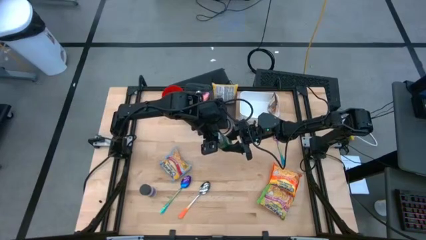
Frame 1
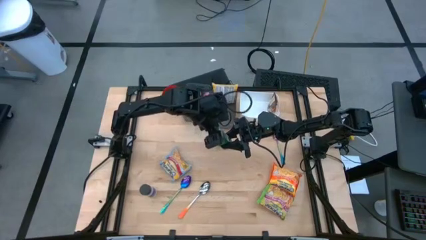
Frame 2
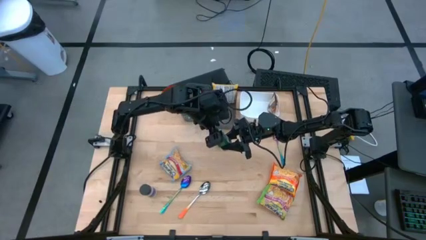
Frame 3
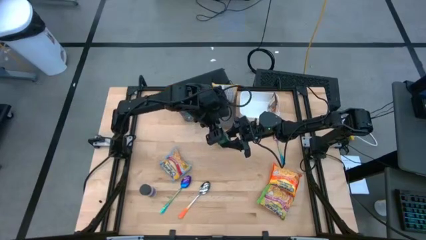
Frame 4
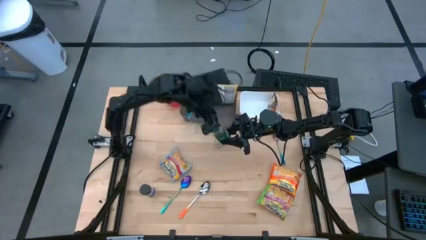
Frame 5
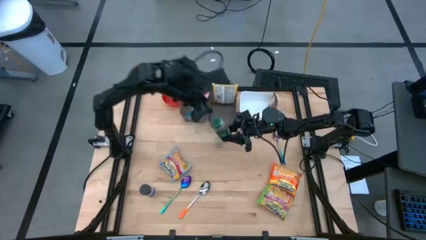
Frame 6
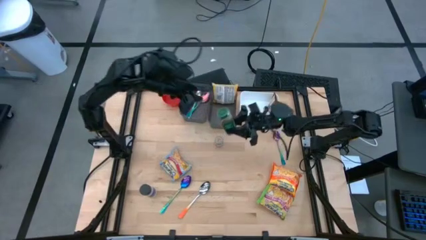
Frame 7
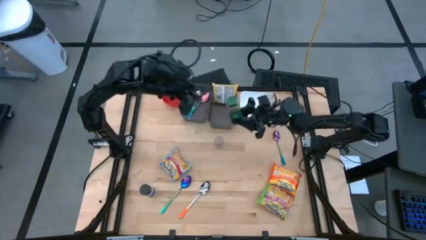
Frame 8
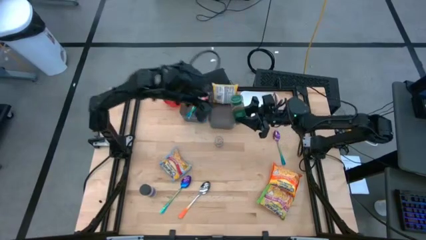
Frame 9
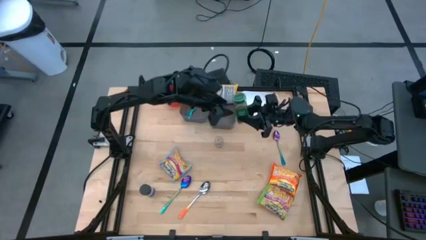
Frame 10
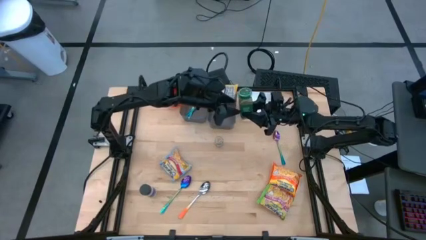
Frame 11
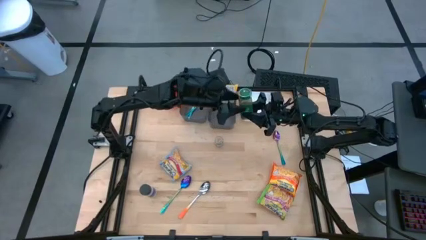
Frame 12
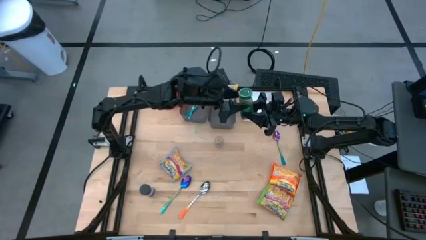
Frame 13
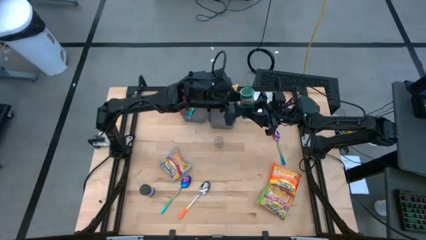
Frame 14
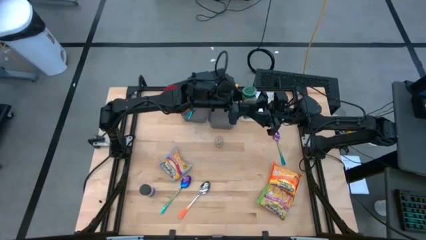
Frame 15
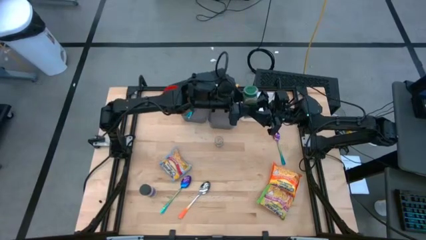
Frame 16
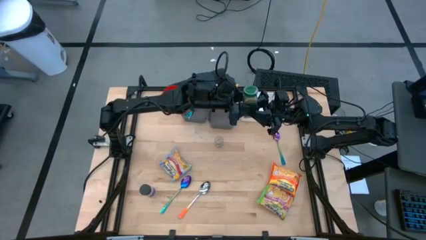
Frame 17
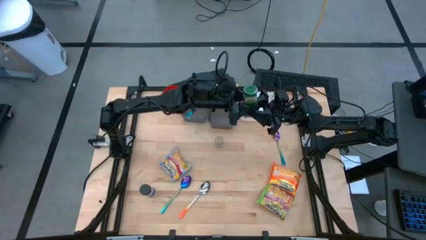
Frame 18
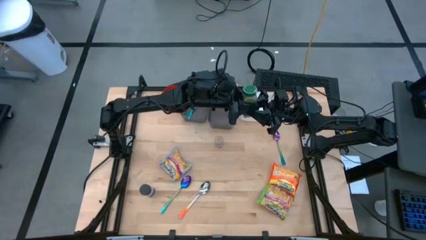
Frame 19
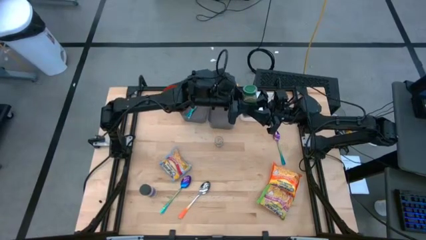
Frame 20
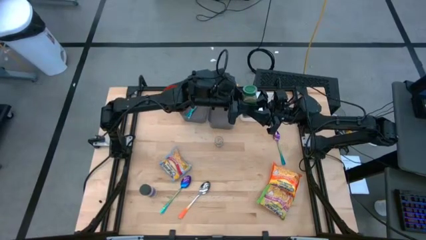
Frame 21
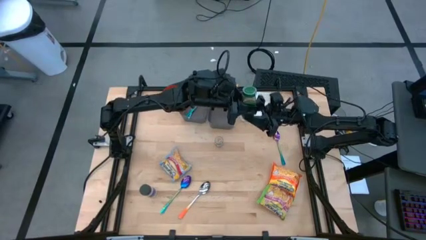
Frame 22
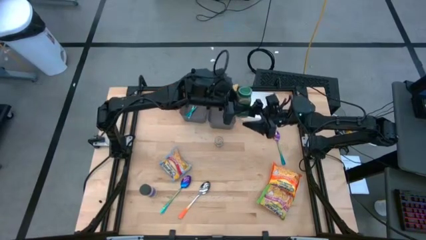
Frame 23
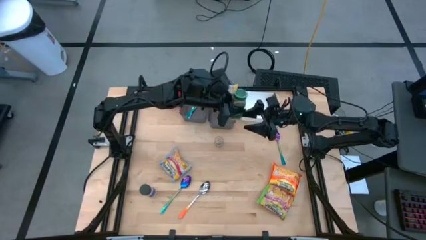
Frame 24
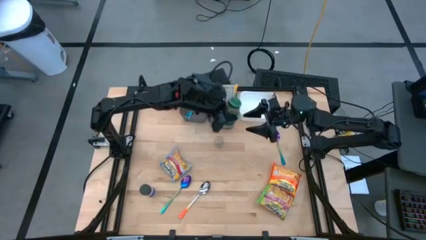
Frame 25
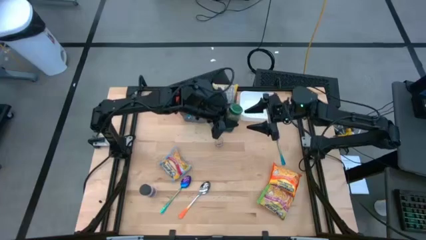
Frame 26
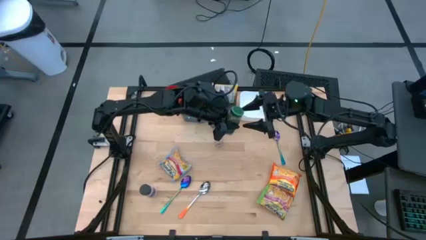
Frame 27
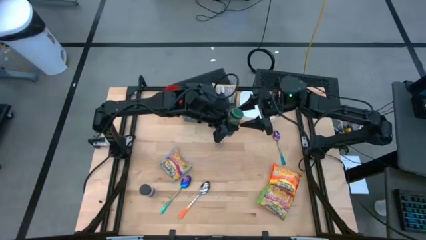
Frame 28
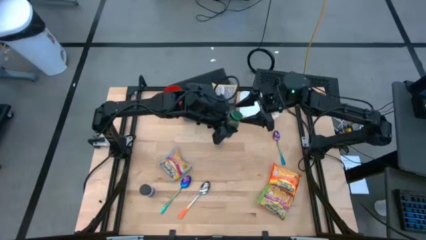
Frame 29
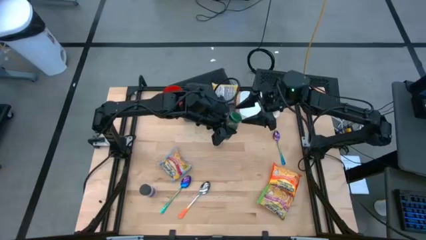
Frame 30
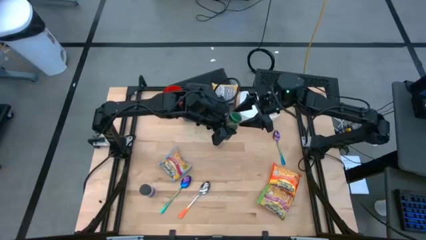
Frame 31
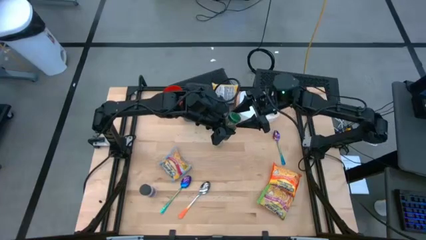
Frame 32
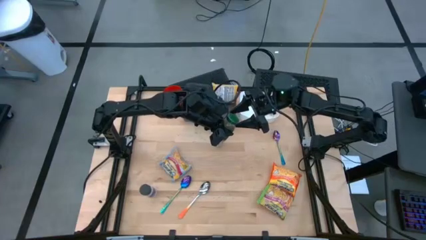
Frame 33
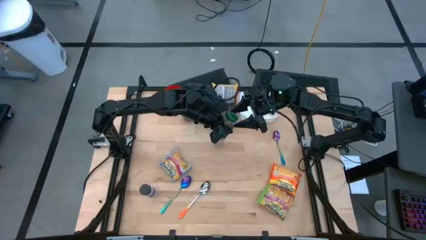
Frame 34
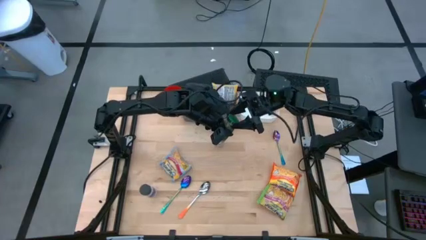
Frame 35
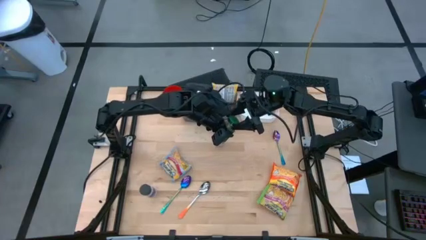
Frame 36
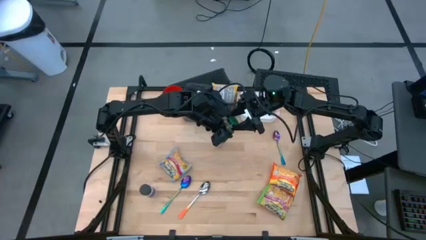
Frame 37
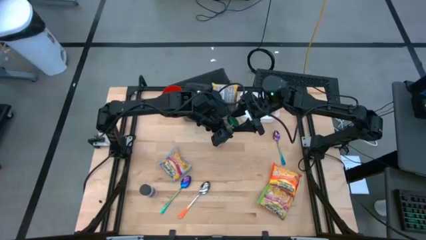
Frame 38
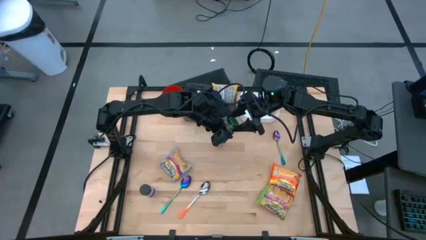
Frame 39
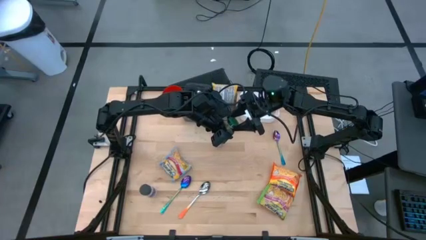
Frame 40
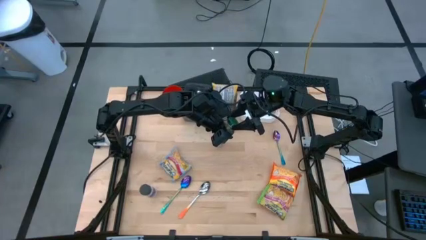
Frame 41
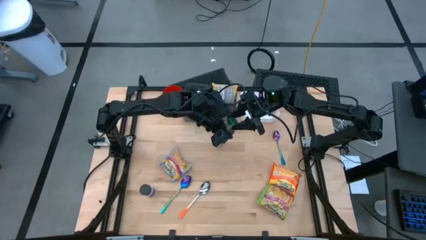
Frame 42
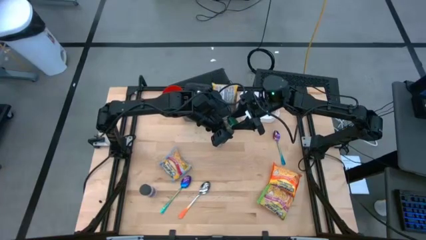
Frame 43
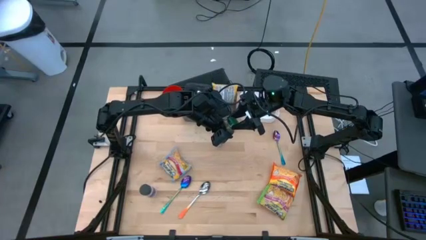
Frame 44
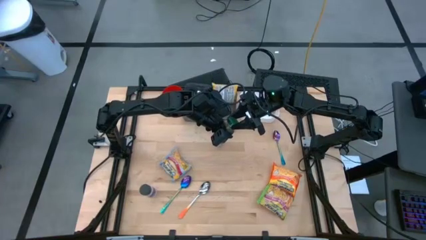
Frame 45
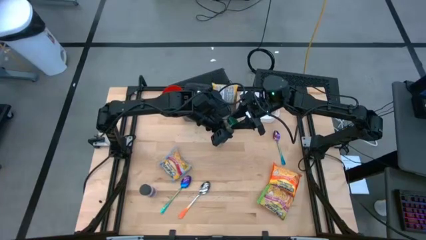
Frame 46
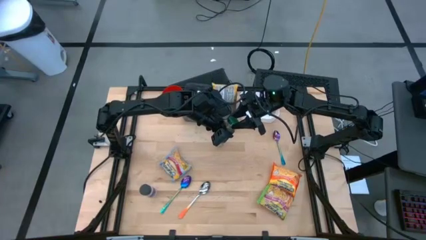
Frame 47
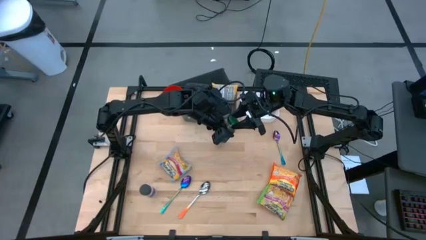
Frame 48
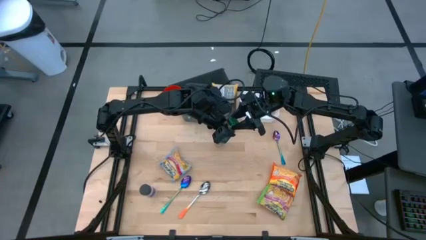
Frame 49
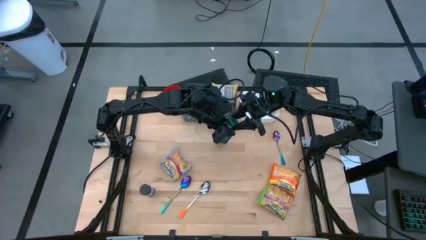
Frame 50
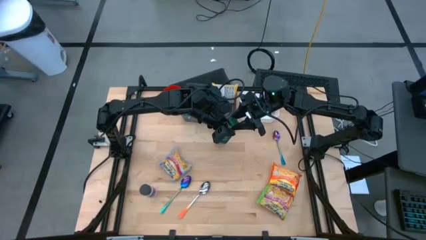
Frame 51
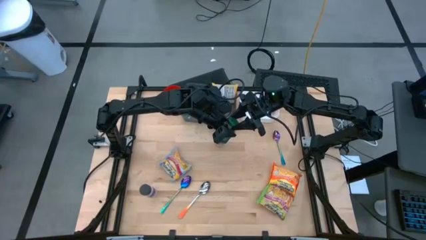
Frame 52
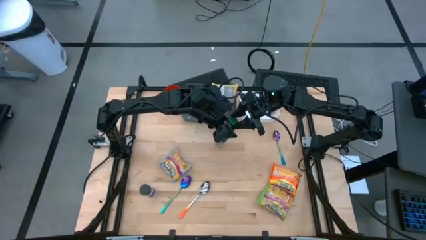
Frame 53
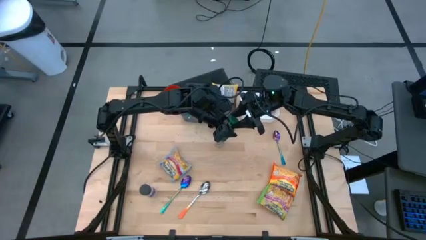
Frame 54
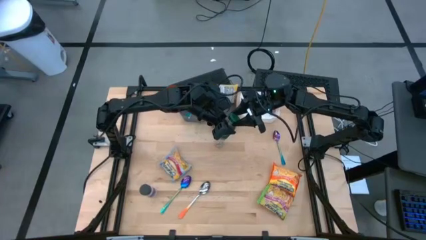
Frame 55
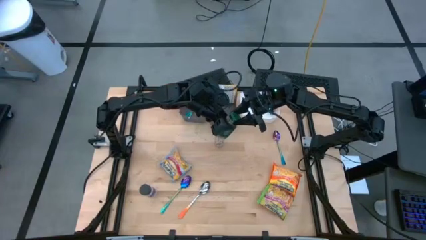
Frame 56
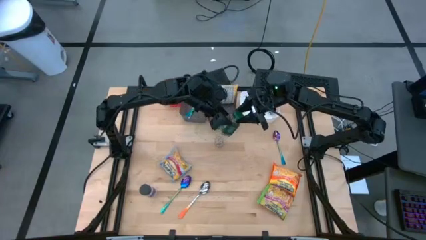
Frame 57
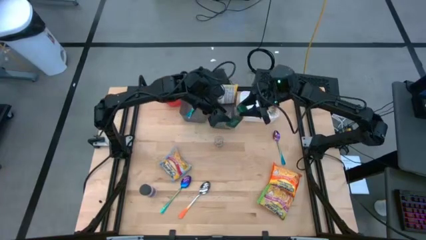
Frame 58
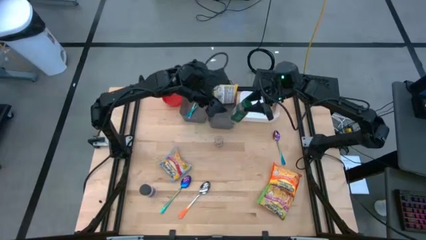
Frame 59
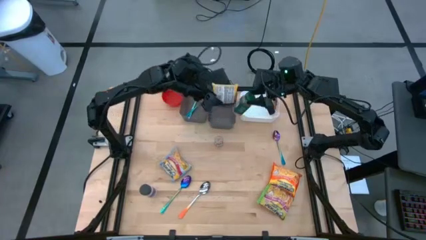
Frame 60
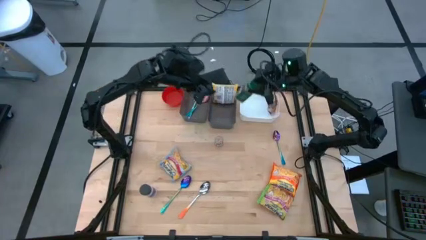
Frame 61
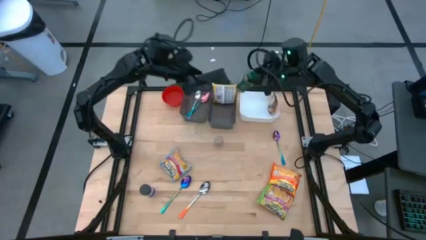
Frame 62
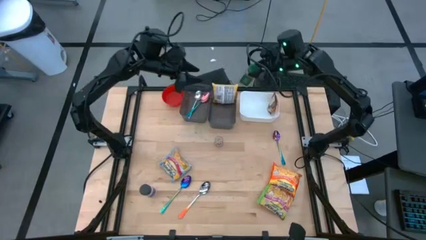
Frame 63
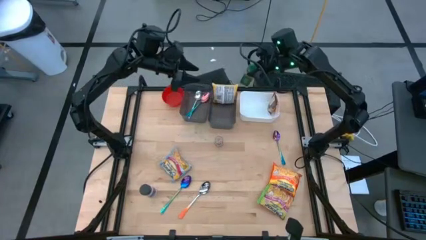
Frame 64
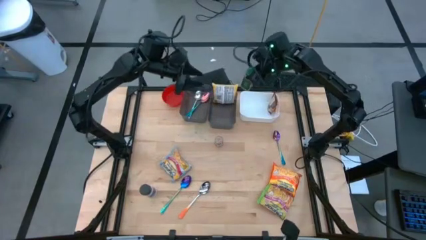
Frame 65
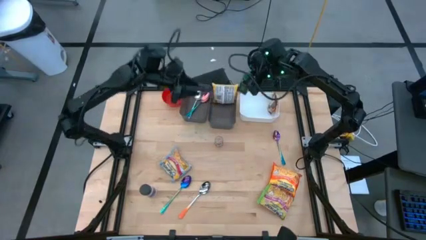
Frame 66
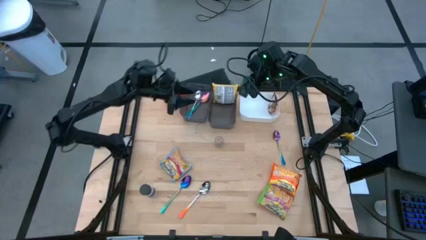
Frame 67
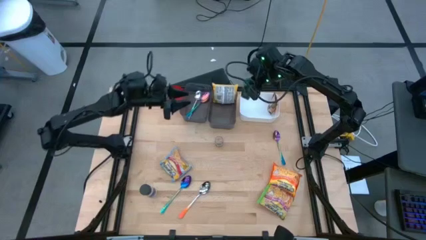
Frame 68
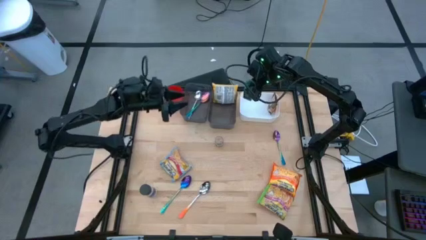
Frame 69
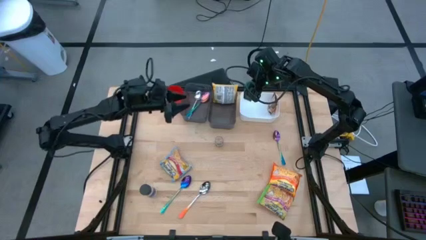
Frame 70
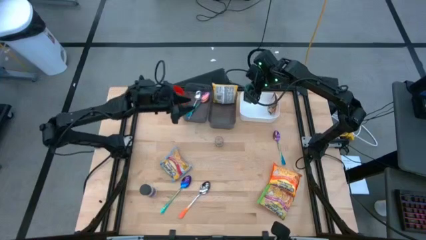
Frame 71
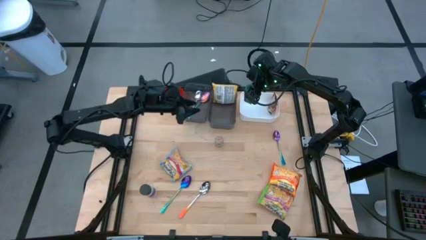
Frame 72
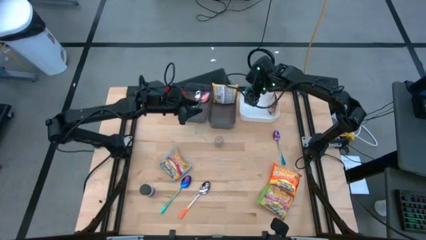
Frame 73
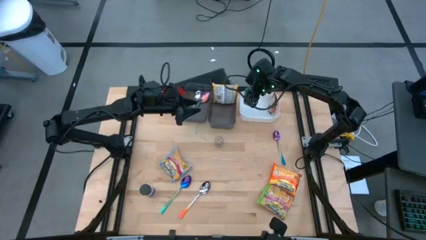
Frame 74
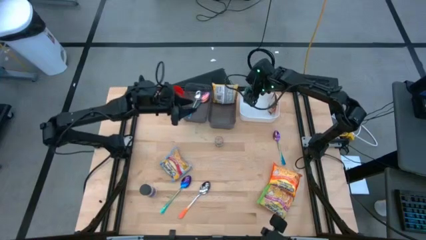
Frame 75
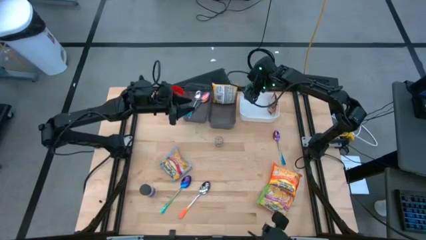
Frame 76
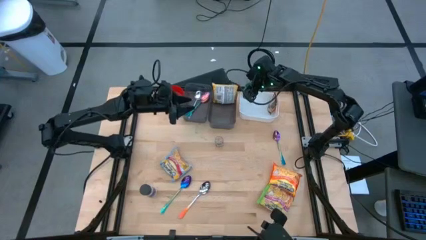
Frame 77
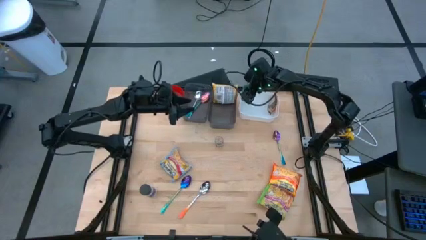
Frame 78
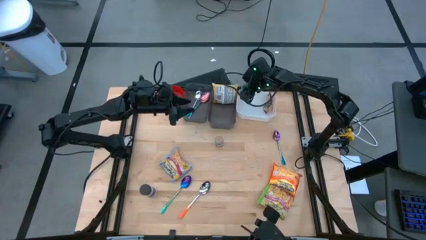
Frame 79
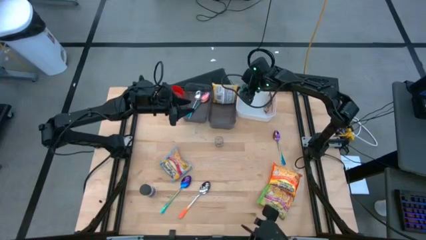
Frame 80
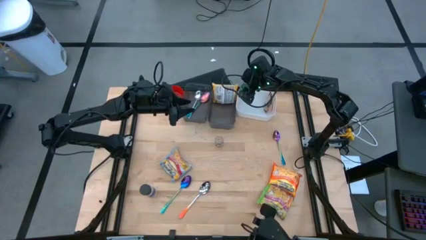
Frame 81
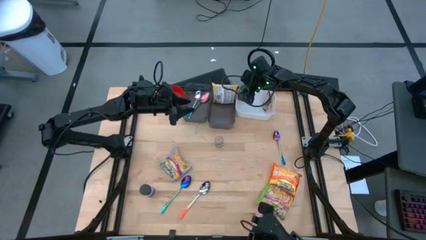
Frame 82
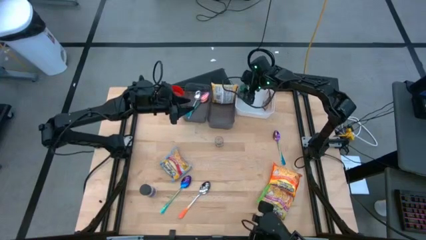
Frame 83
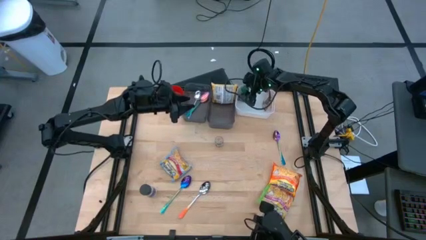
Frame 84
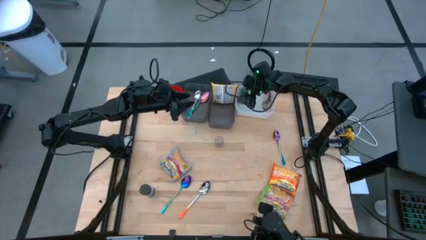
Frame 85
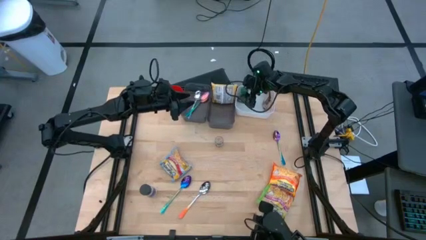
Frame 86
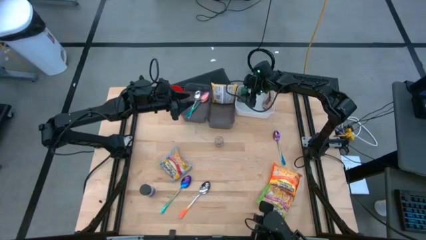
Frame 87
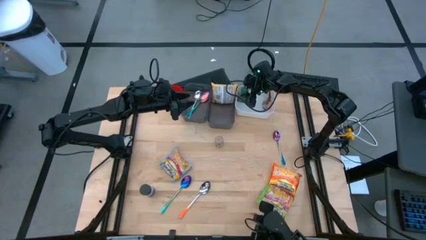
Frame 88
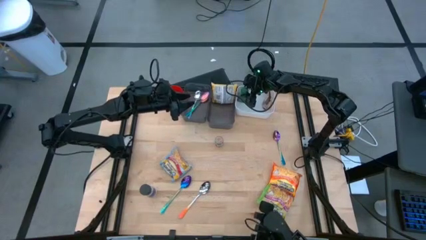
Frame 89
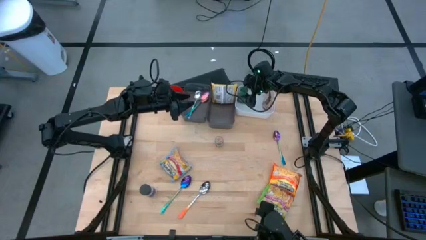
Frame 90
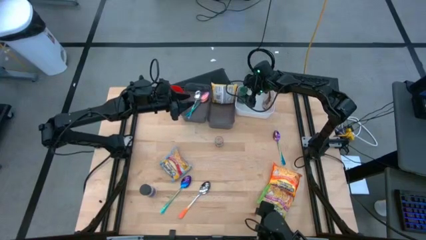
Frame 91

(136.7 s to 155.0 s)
Task: Pick & Place Food Item
Put the green seasoning bottle into the white bin
